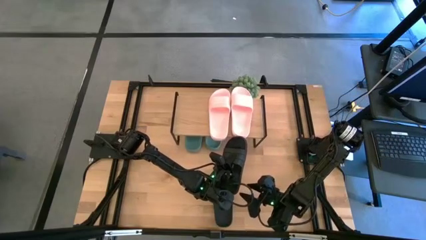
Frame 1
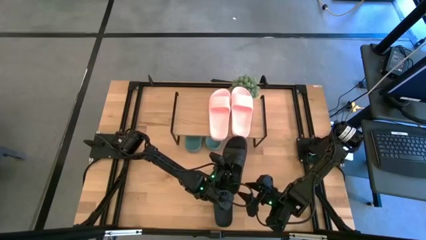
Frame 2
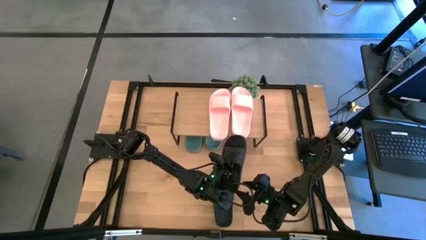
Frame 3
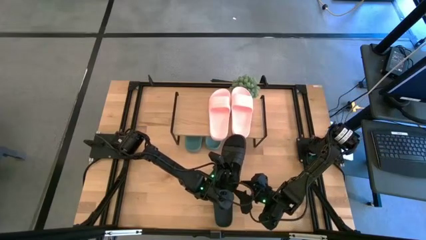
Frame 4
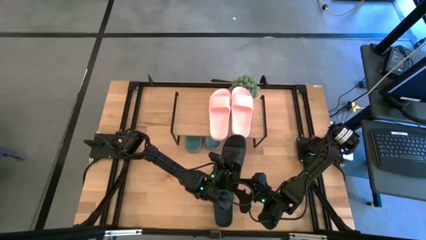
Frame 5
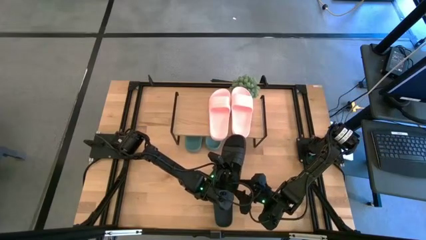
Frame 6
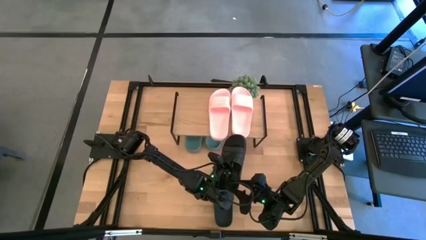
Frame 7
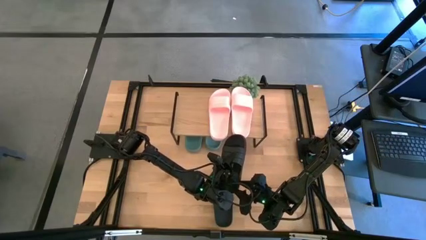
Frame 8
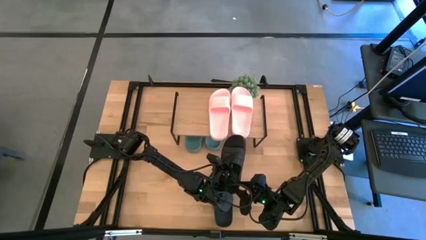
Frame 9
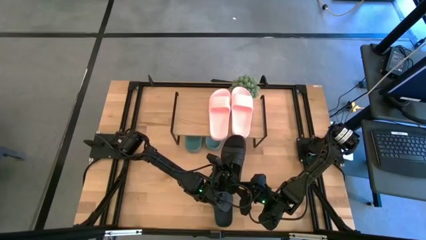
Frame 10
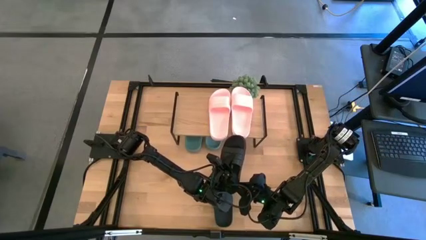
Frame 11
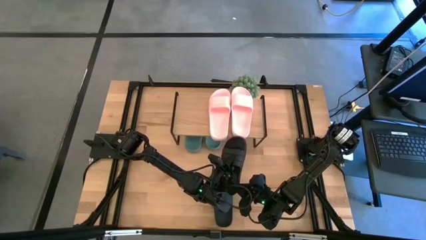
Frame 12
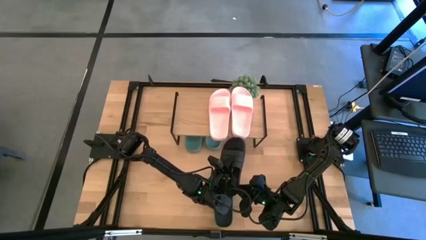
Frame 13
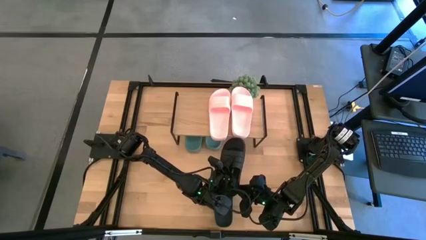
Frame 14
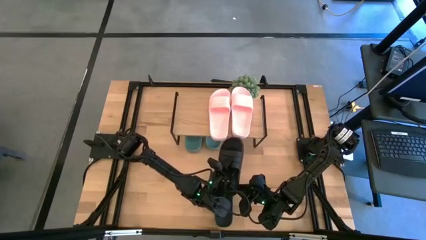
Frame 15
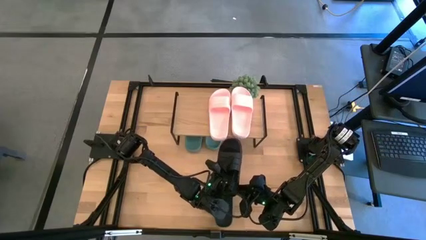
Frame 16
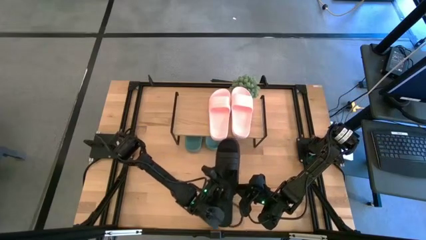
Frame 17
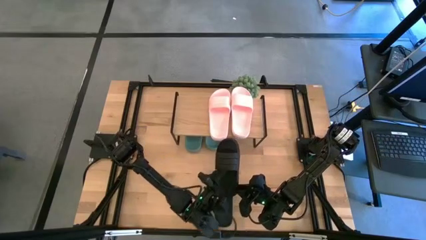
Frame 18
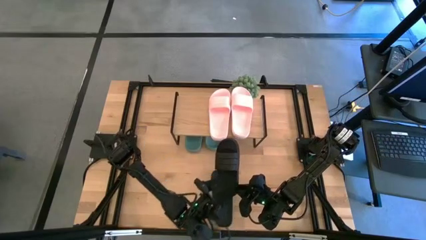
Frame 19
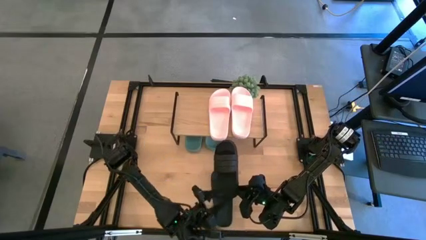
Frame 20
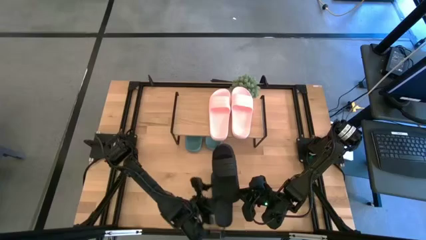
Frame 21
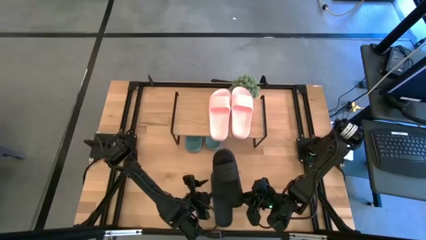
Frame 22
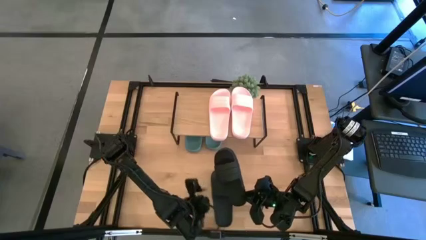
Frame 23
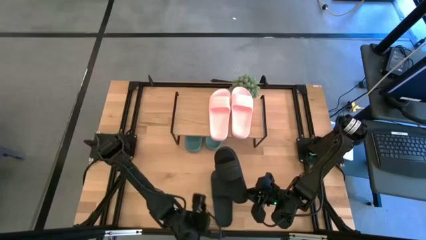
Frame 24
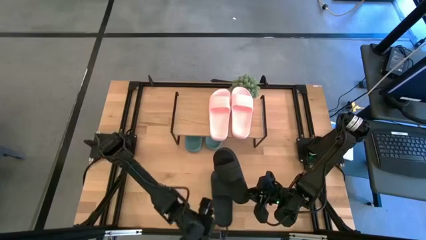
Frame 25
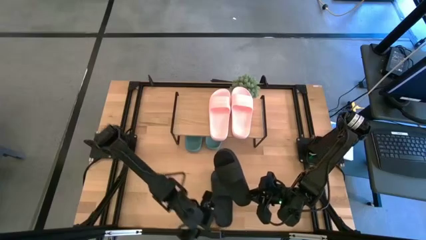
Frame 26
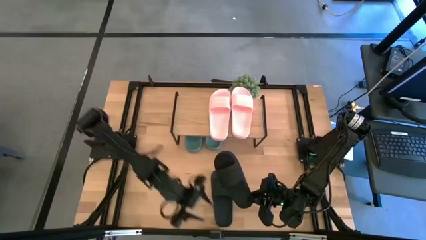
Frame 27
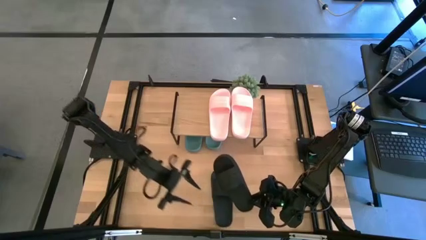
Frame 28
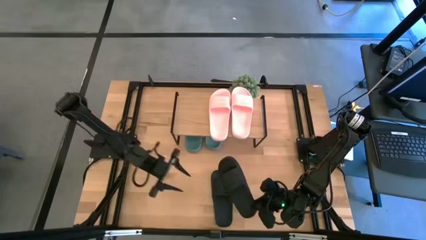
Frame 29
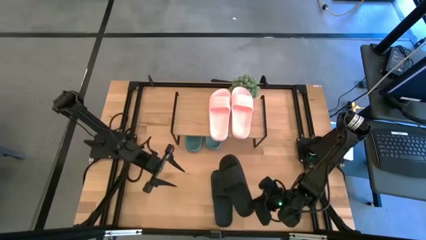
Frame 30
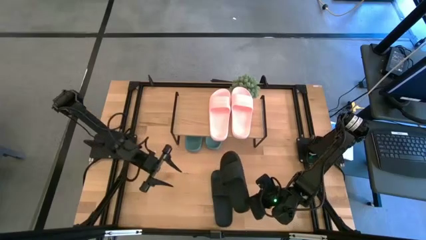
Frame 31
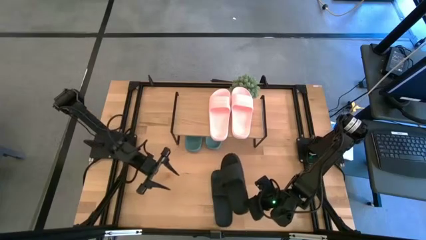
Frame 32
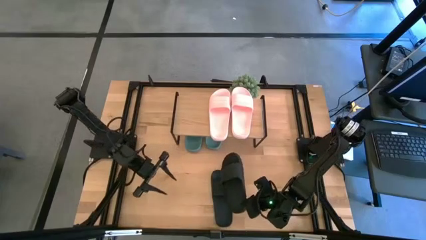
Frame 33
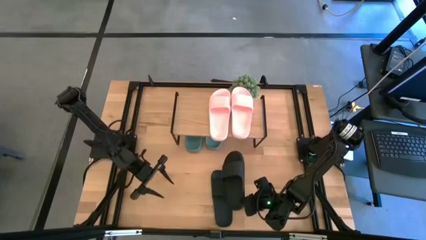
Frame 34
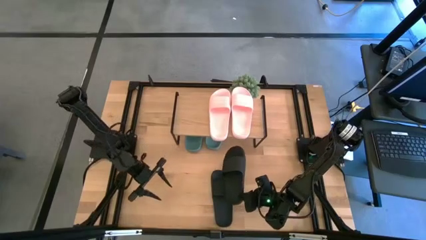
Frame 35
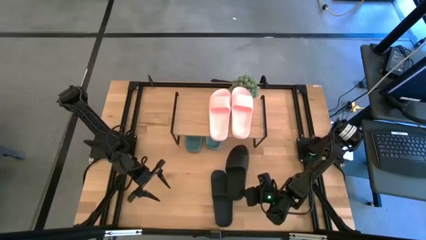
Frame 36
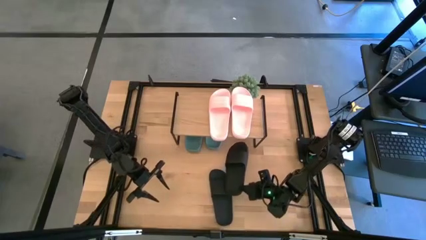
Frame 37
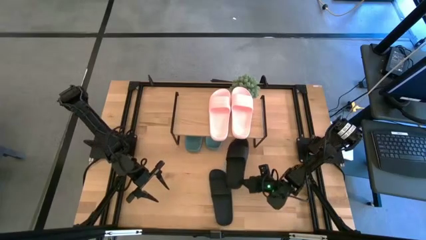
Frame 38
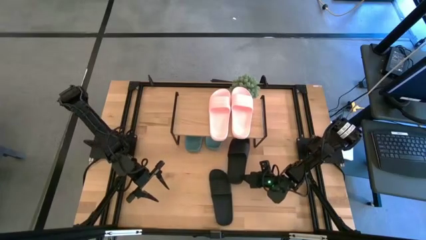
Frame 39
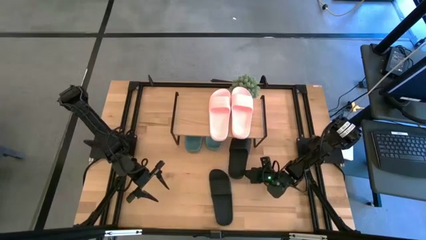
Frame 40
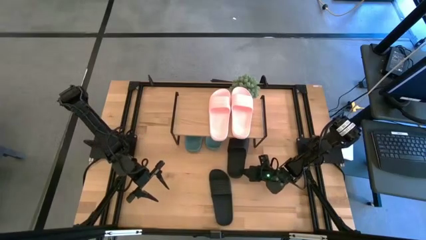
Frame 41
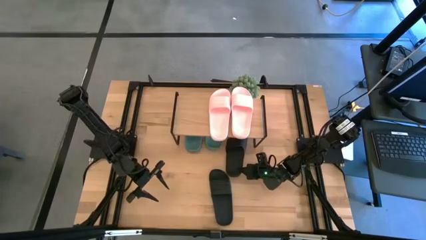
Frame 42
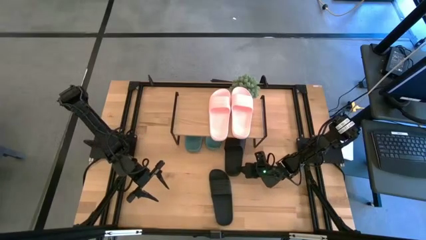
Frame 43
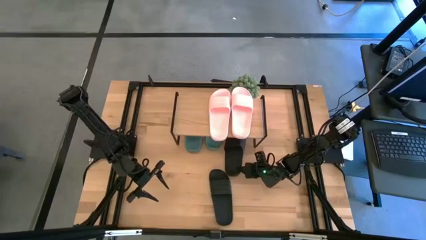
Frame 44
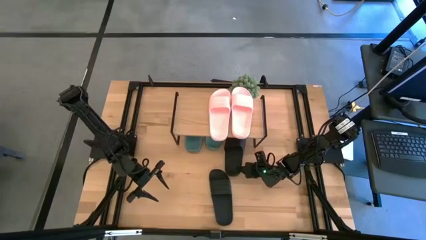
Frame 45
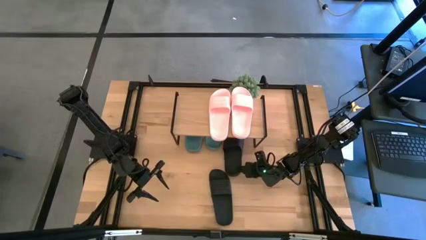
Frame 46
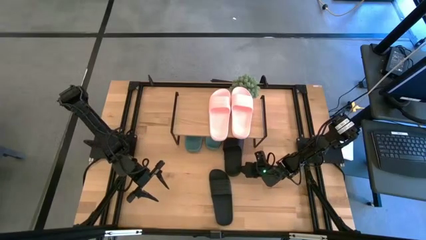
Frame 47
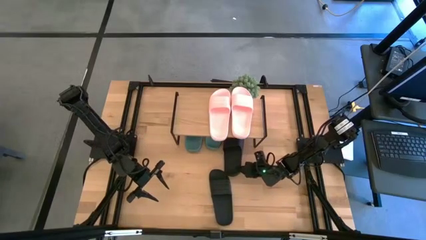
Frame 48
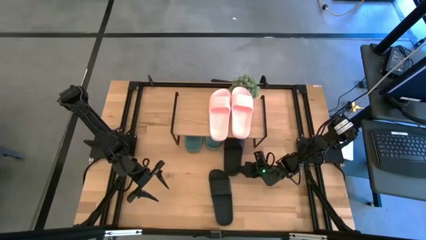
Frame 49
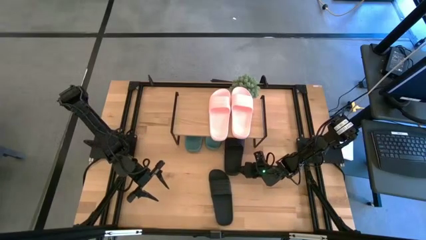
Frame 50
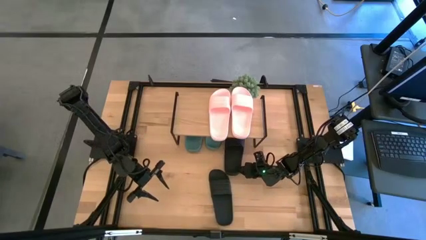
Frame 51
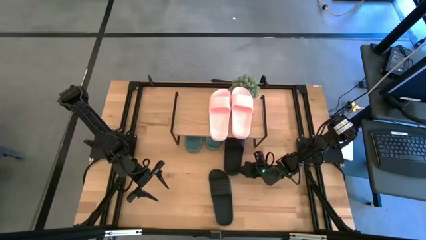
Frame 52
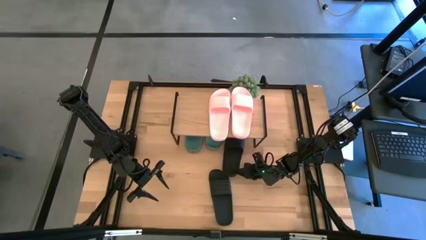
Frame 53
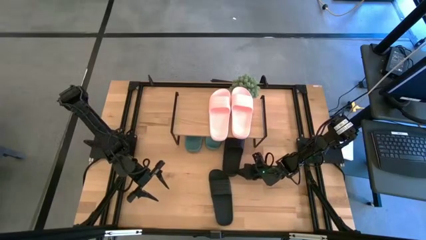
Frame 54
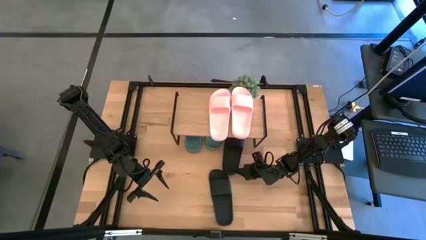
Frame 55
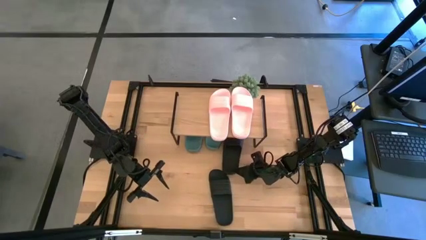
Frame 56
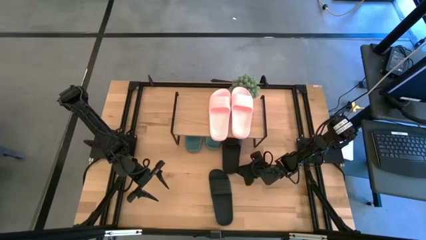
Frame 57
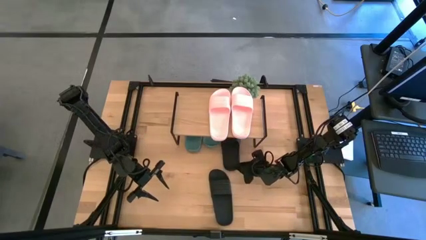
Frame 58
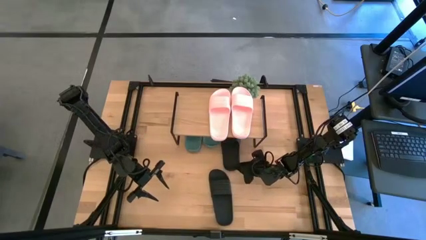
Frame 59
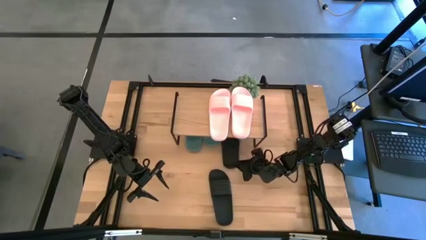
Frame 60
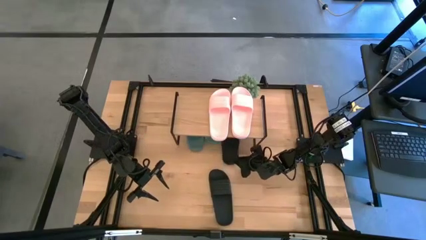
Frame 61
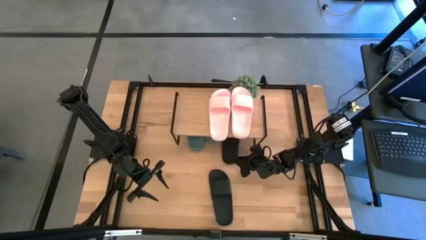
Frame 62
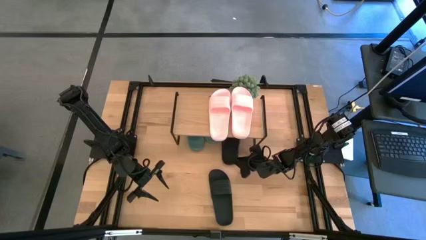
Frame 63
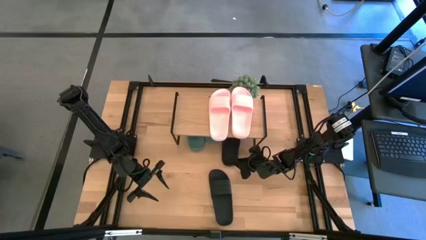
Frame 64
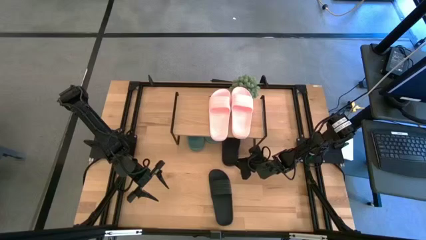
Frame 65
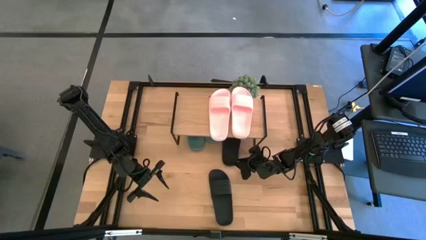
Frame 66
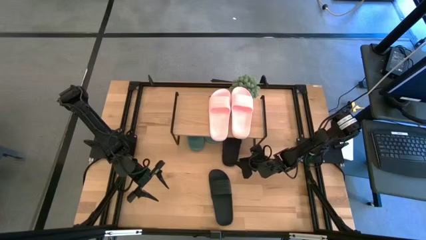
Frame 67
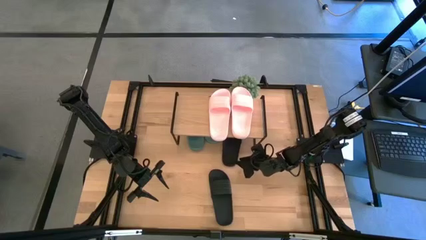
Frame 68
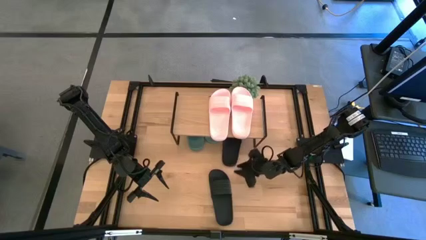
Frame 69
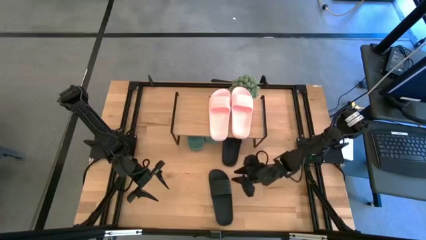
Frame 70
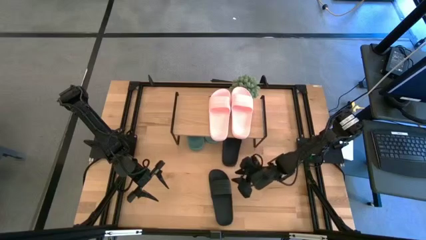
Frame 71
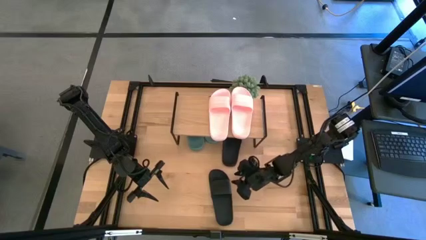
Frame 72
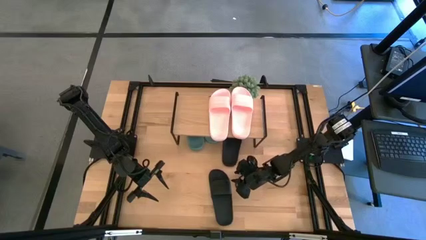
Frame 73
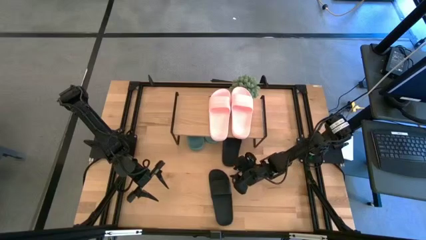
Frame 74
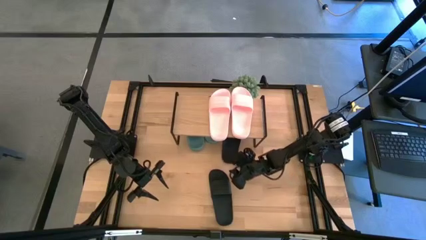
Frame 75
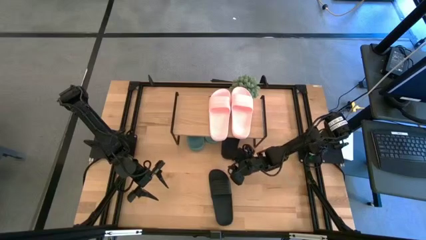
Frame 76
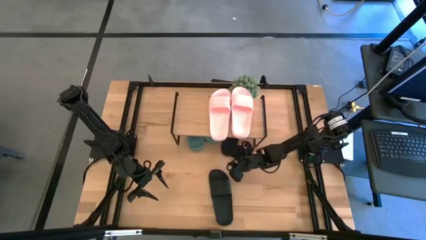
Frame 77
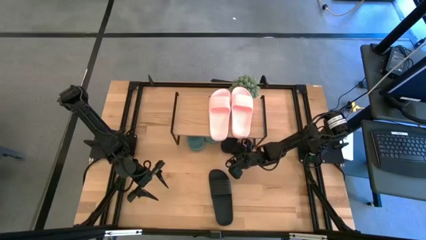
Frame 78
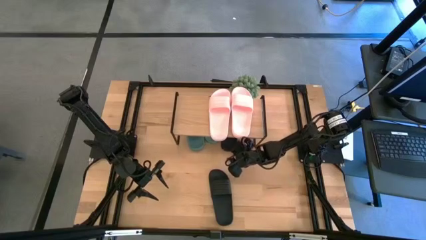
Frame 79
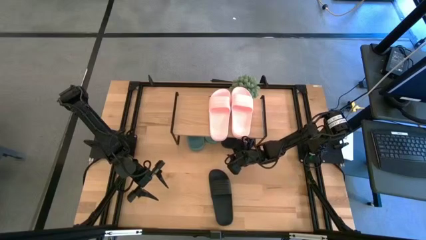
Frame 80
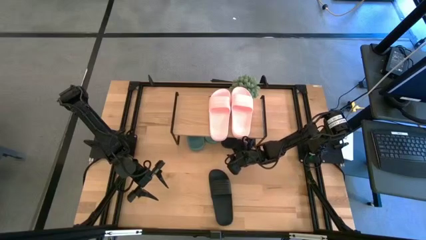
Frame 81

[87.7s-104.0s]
Task: Pick and place slides into the shelf
Put the left black slide under the shelf
